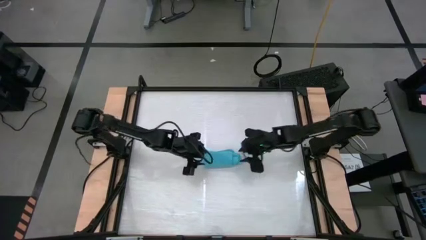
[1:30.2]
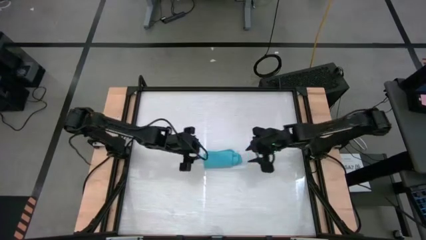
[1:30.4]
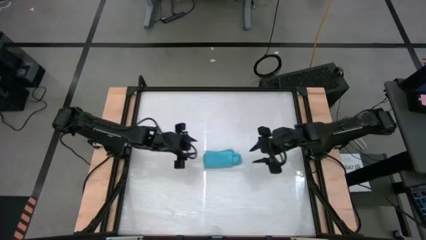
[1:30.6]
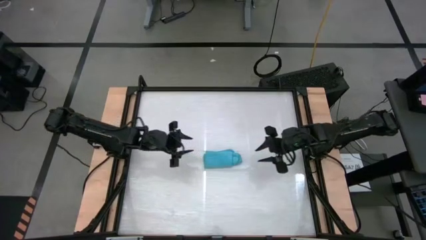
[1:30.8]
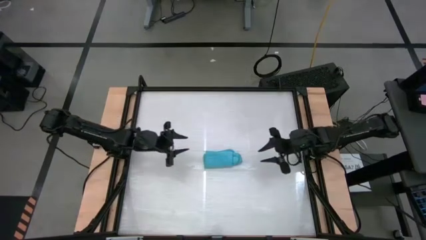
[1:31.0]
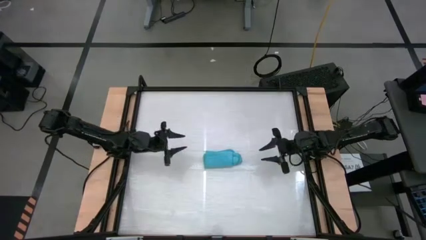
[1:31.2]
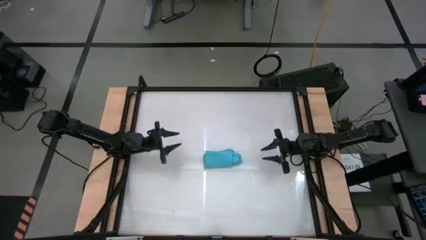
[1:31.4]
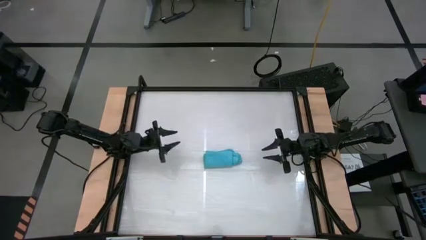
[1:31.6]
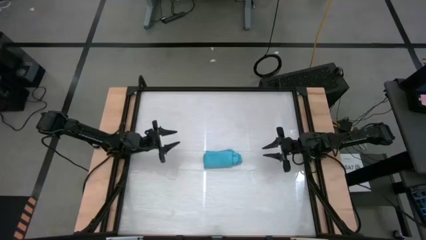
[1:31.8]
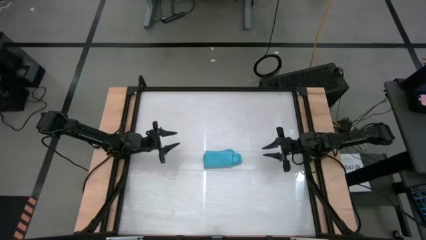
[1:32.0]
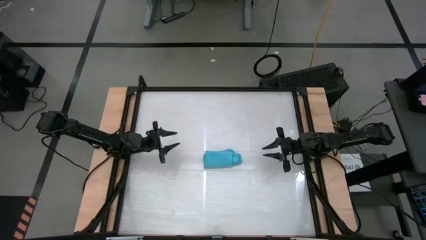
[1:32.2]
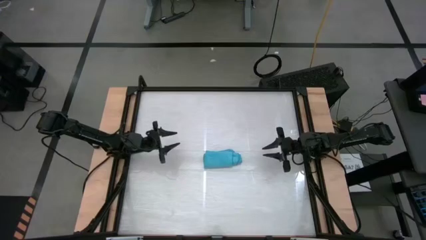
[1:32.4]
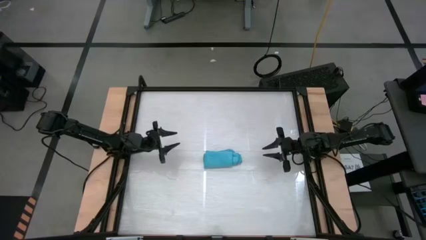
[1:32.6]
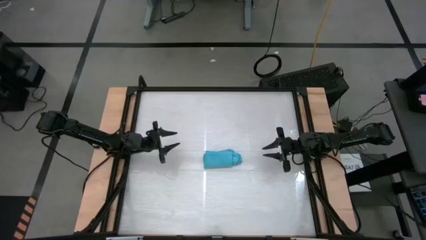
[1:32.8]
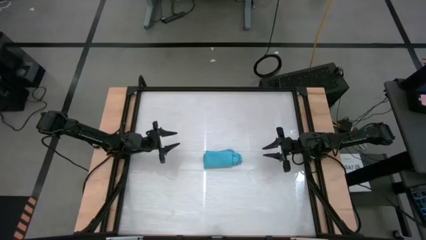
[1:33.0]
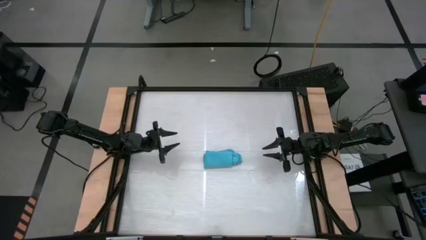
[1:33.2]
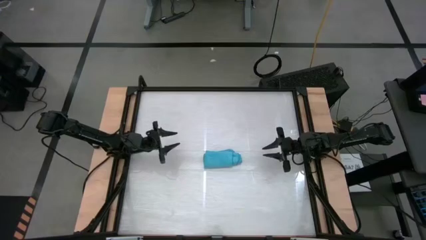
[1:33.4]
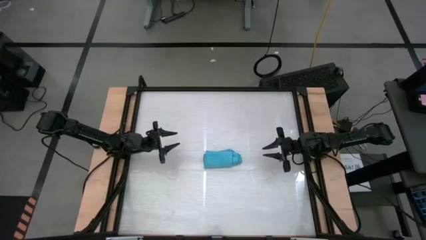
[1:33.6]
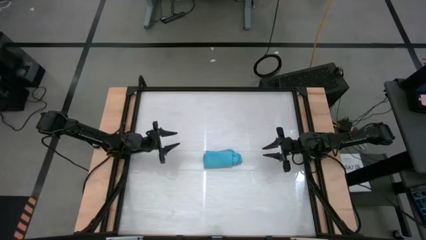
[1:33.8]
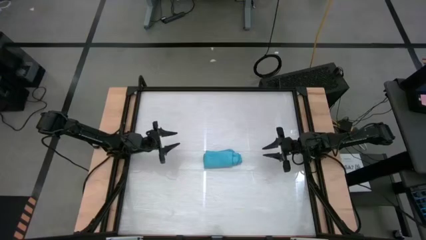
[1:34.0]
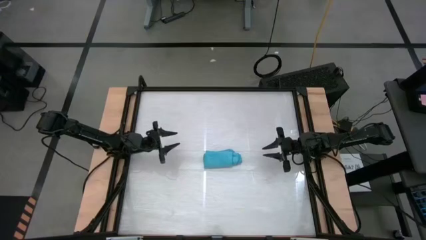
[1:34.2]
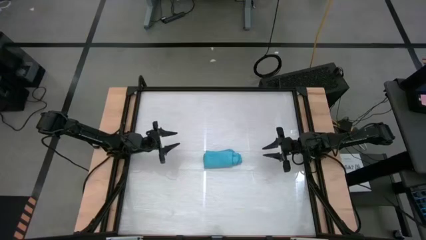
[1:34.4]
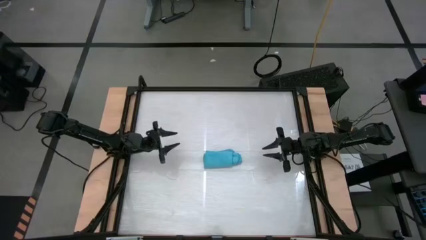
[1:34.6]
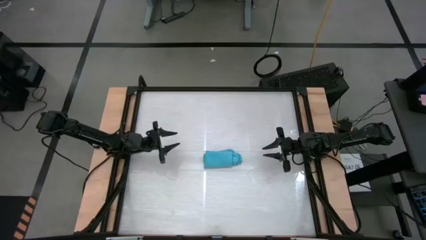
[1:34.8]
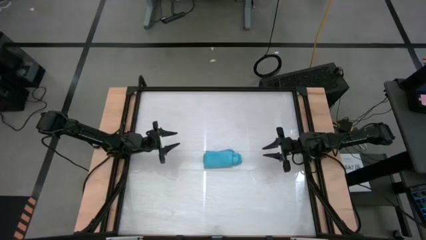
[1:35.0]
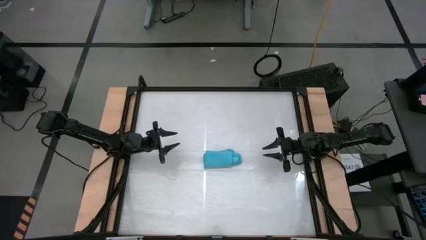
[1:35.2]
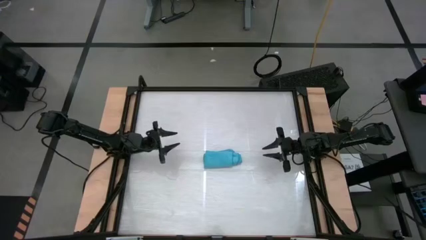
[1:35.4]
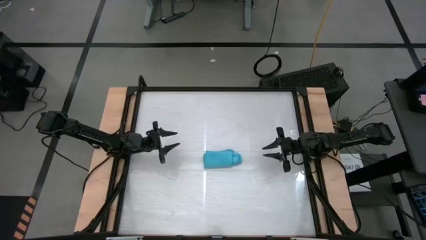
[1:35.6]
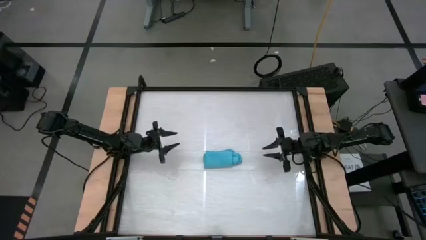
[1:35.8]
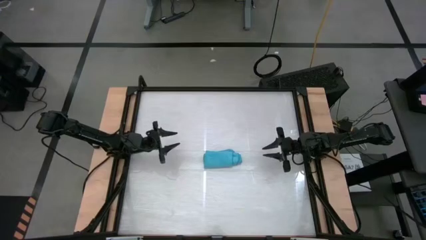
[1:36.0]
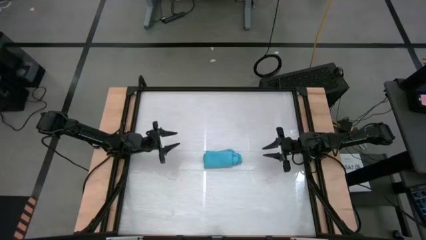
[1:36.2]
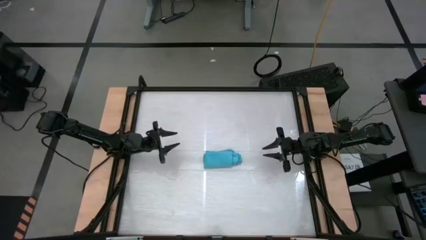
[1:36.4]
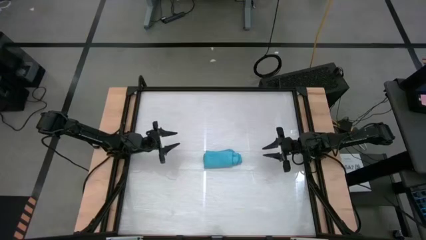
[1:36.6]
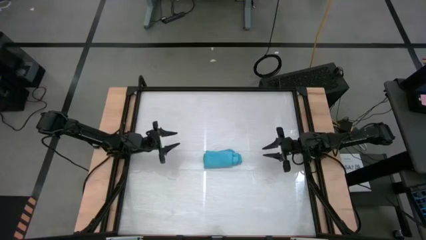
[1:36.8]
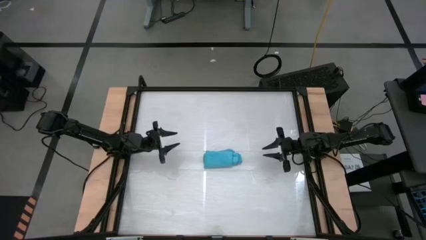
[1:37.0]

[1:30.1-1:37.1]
Task: Roll towel
Return to Home Position

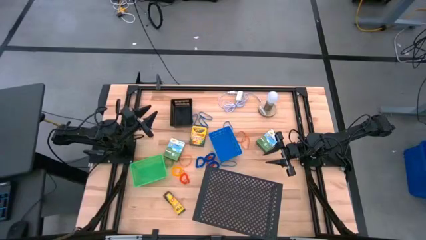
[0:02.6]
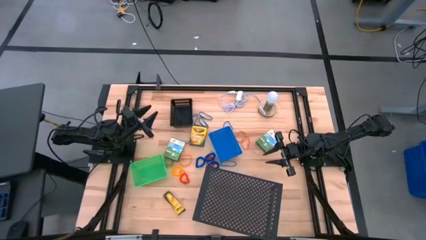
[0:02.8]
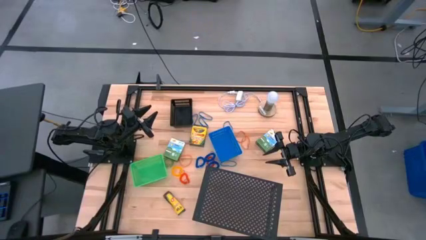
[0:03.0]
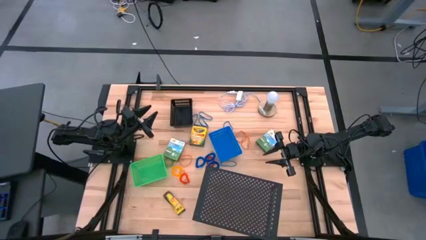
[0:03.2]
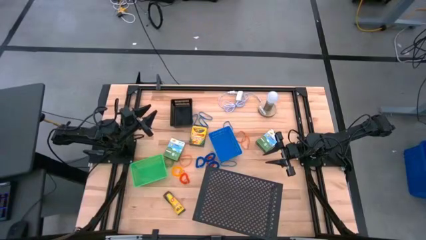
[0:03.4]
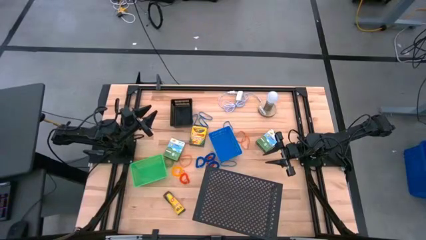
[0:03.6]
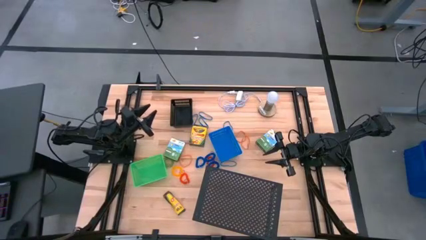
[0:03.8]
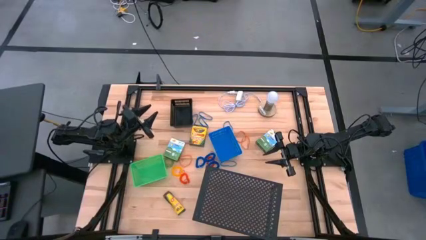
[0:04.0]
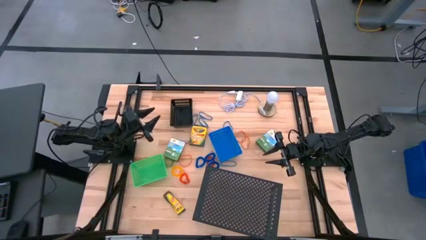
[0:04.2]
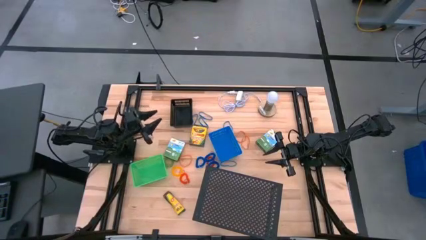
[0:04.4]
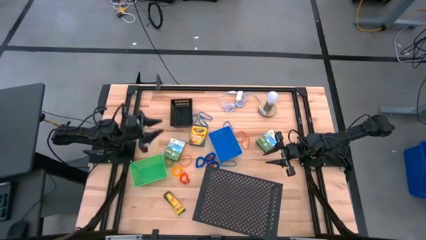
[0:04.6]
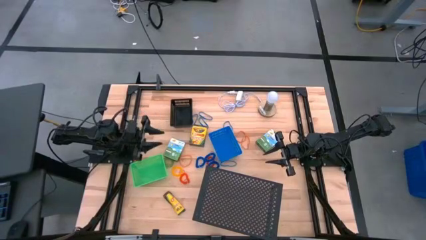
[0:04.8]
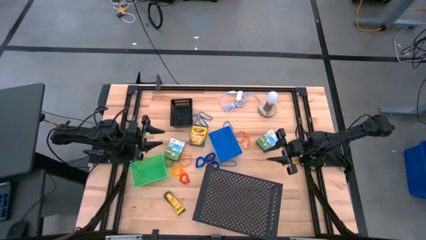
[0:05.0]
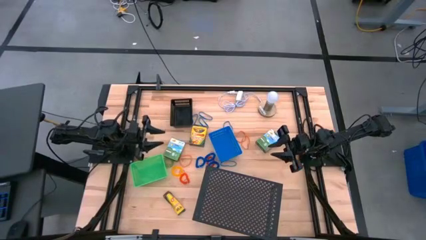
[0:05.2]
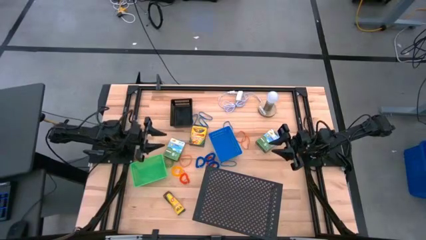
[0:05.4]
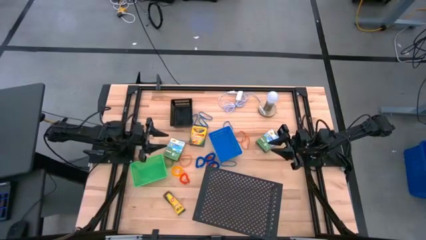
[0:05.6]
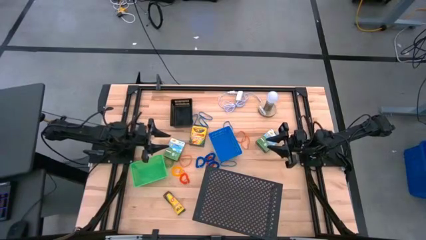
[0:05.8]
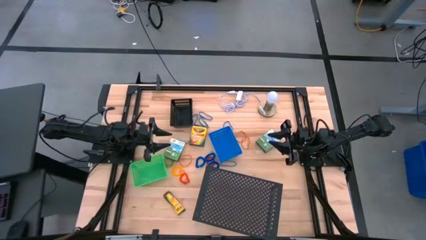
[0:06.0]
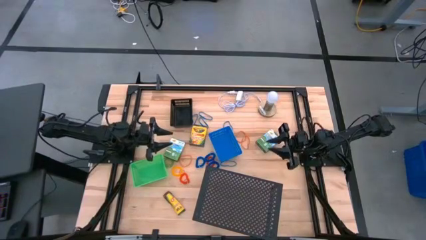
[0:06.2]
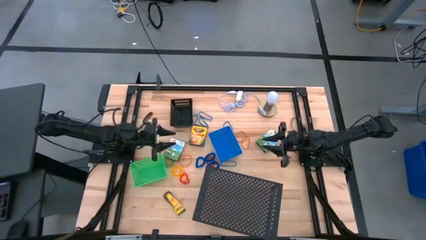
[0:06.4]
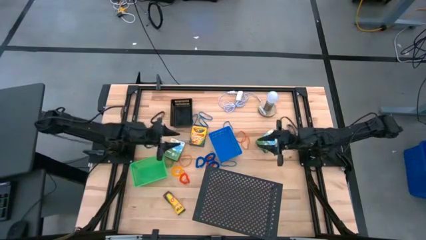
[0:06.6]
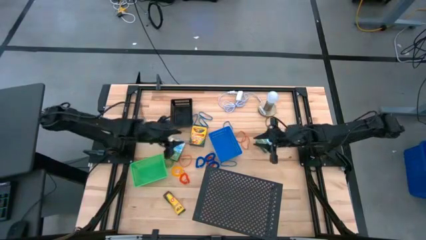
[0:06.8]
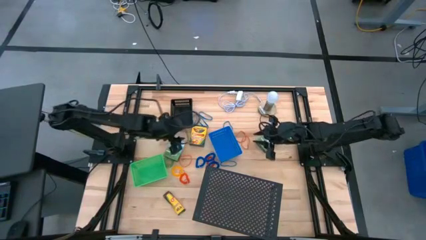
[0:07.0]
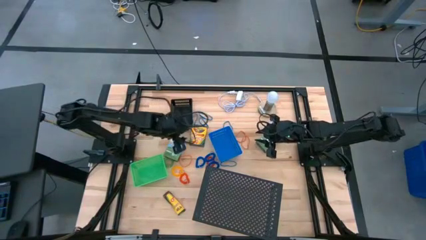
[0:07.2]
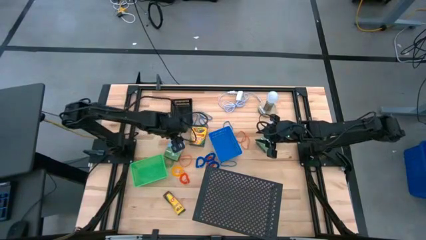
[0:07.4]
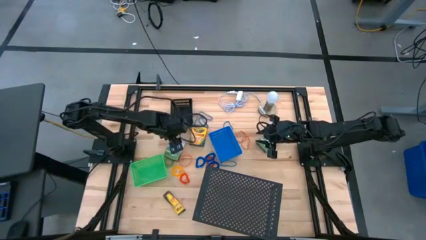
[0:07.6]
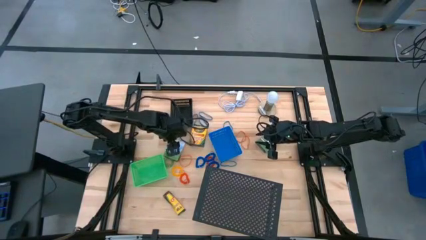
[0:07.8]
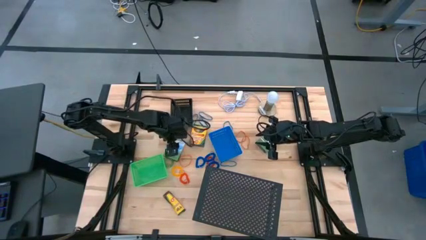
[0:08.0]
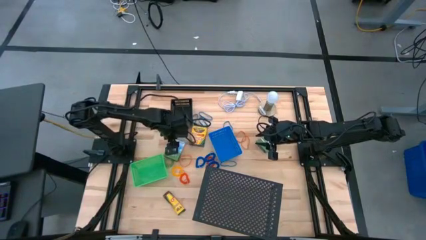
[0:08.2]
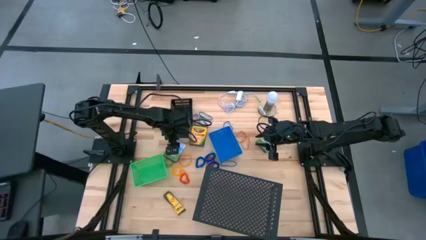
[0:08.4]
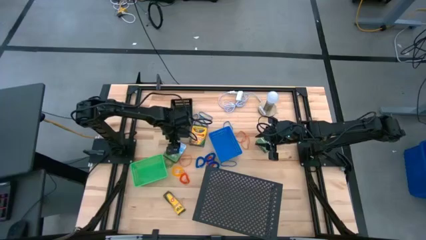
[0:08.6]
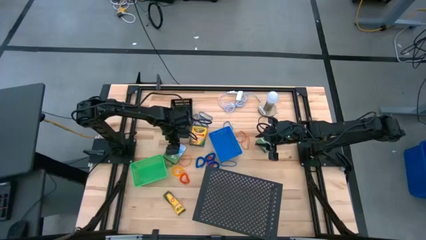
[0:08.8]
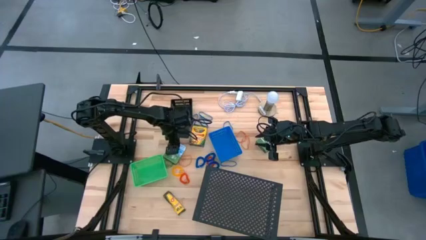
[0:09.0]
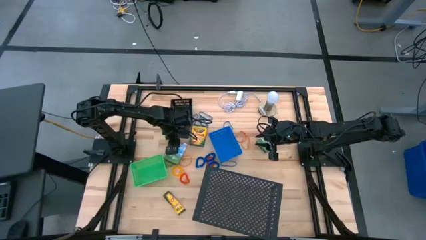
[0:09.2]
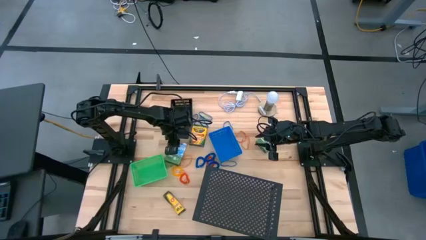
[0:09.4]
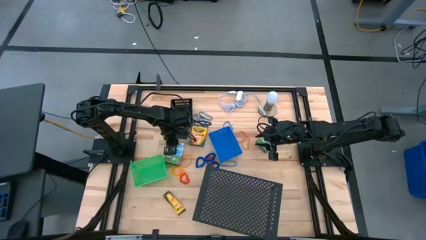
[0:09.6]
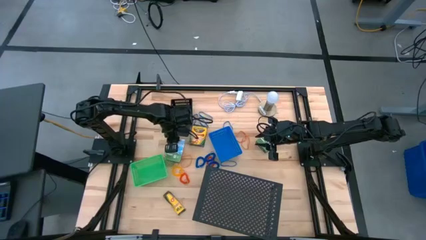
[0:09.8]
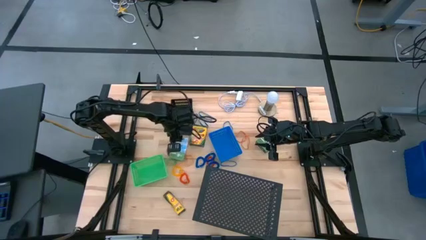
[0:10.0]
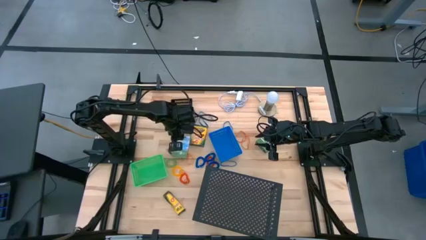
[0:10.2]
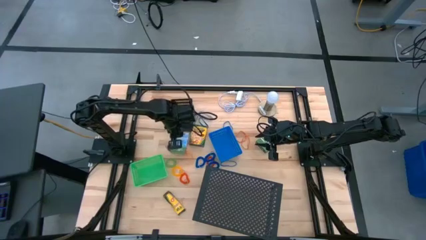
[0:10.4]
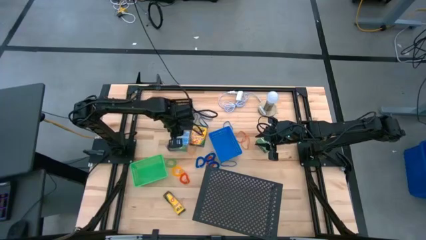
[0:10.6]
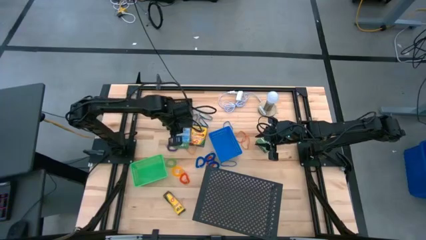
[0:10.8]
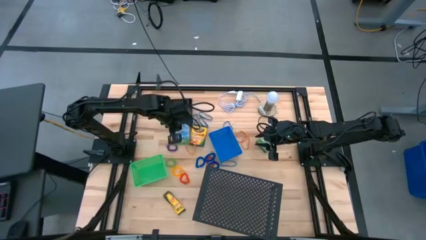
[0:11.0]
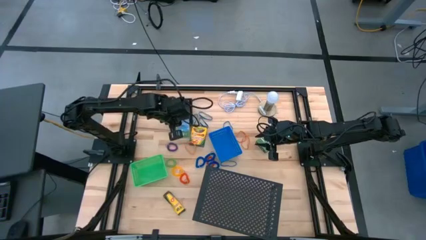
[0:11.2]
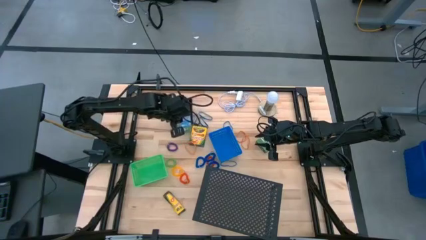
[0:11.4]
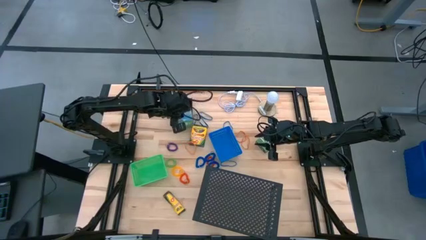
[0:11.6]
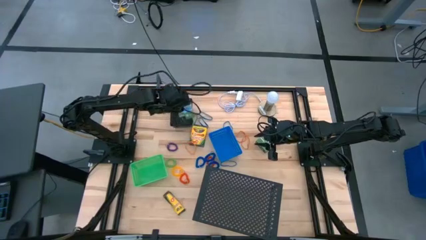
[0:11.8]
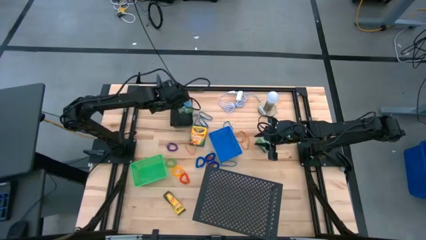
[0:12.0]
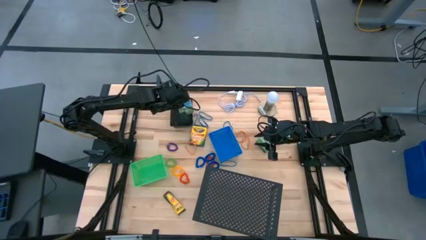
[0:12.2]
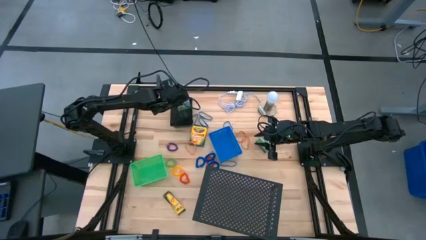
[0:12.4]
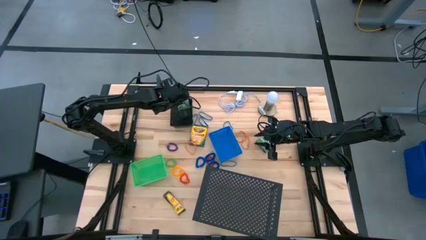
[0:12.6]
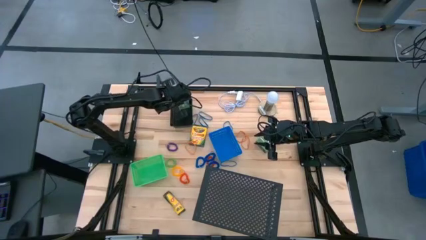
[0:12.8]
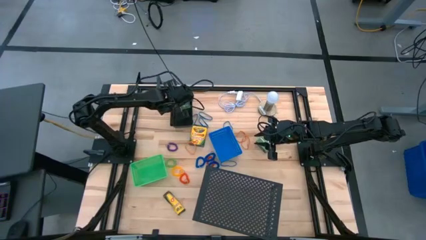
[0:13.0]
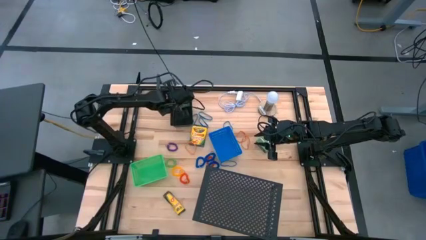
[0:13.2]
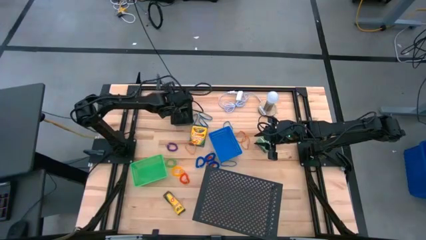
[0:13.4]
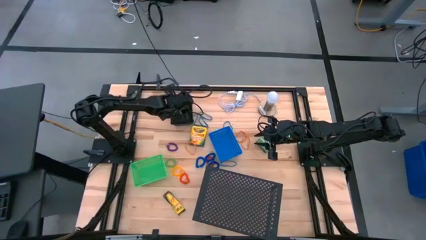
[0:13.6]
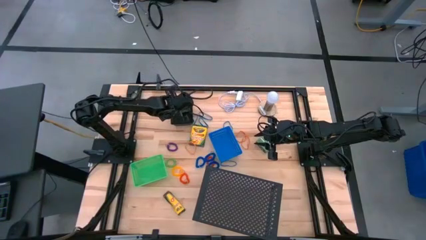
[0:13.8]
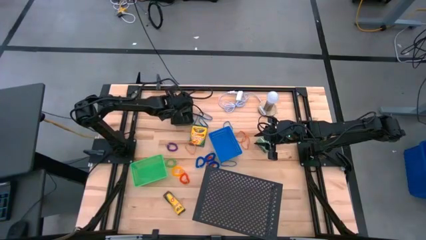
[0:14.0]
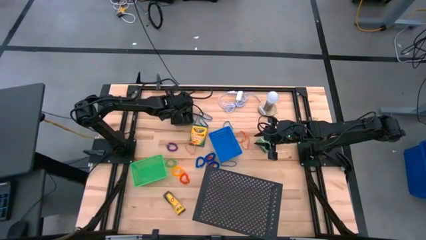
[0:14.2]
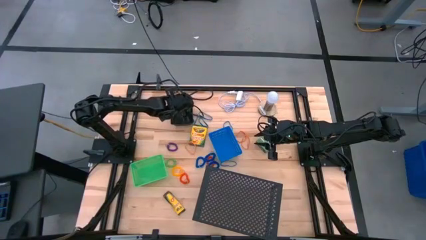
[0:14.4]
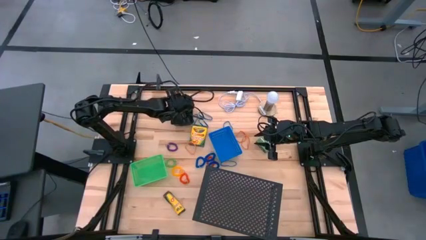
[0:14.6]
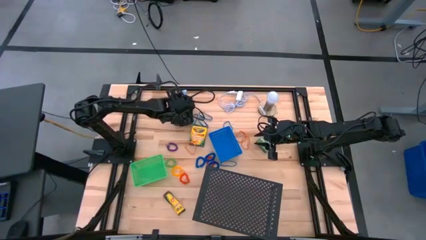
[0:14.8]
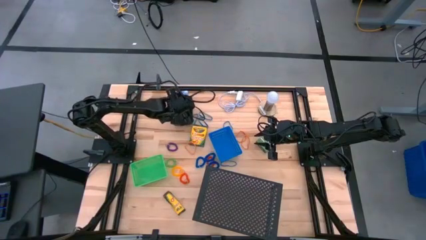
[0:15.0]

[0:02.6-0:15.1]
Task: Pick & Place Office Desk Supplies
Put the blue green crayon box into the black bin
